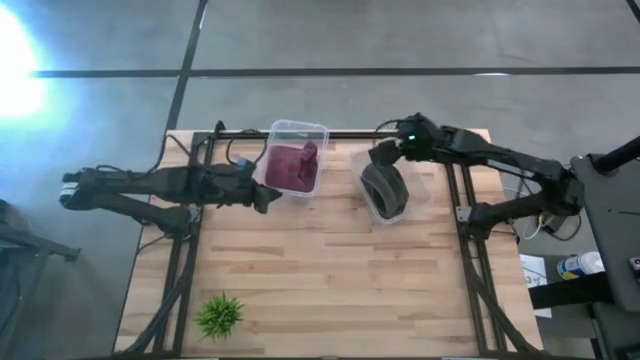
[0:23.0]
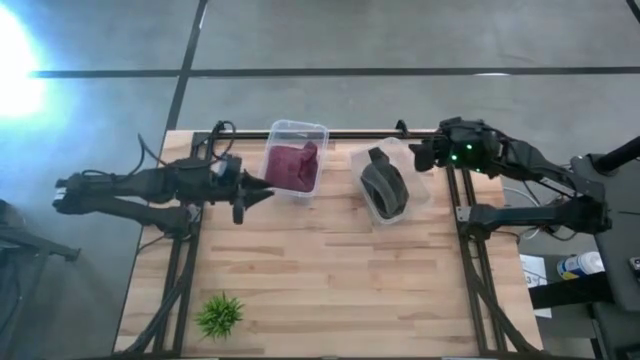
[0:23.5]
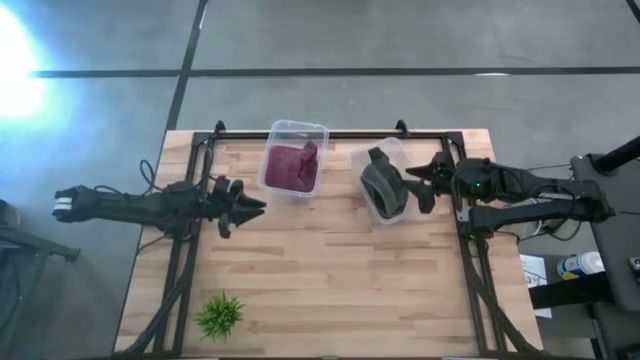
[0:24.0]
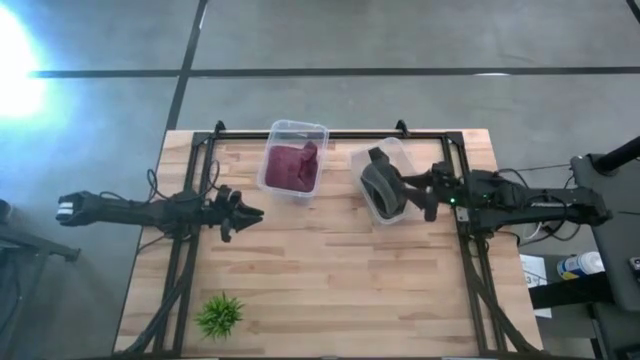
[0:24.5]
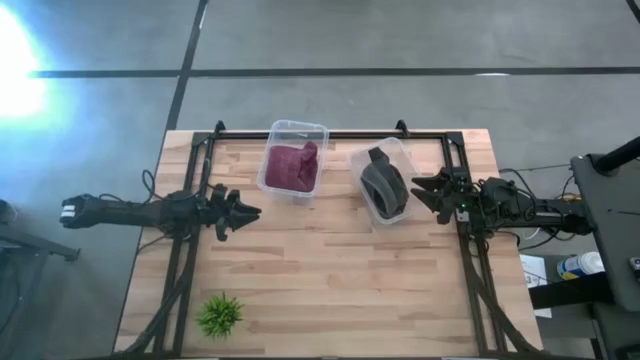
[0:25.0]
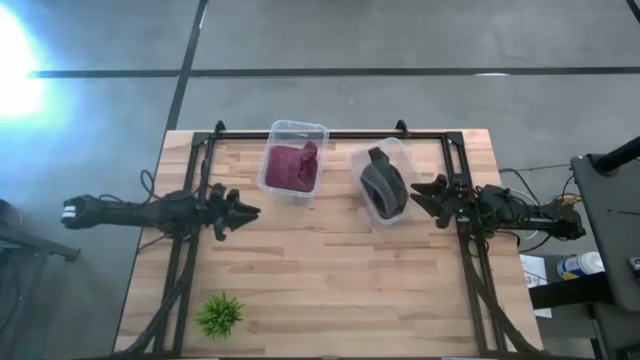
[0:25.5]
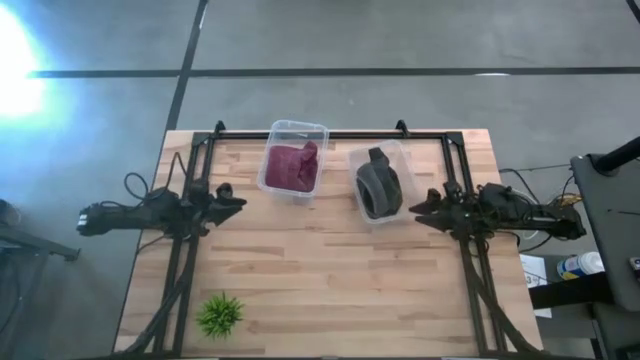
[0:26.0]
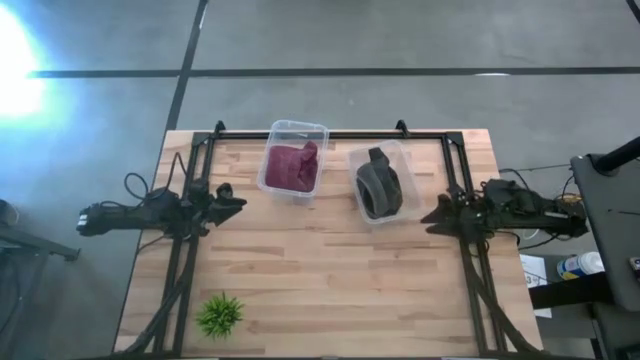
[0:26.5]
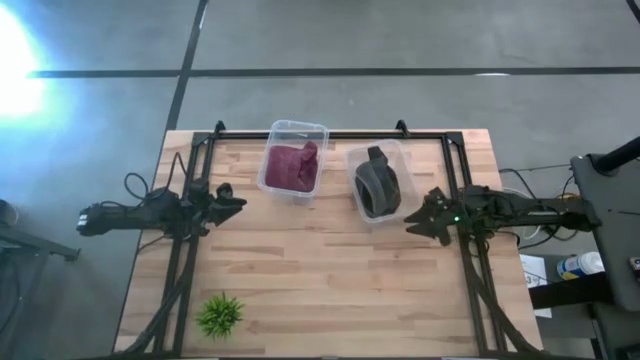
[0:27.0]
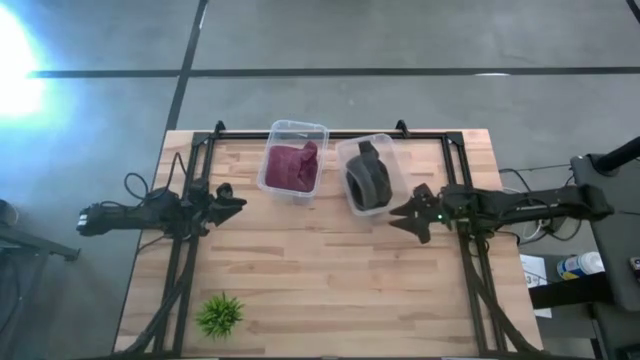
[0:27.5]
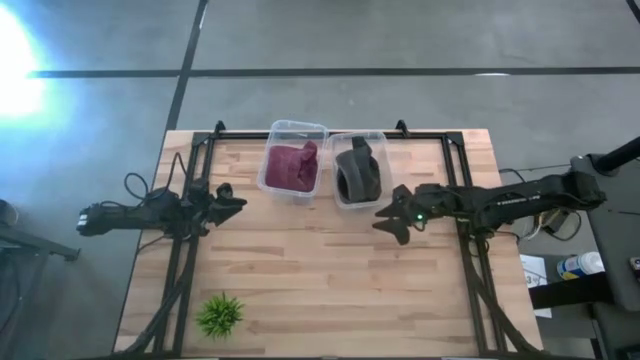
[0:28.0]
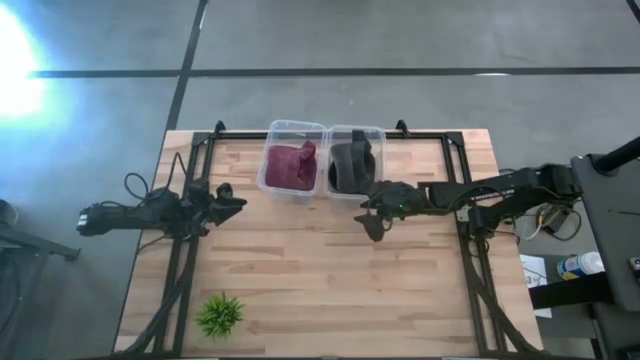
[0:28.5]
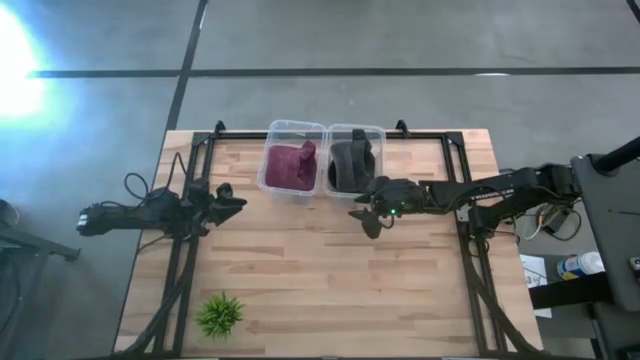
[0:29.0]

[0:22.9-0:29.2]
Task: Pick & Place hat
Adjust the right transparent bin

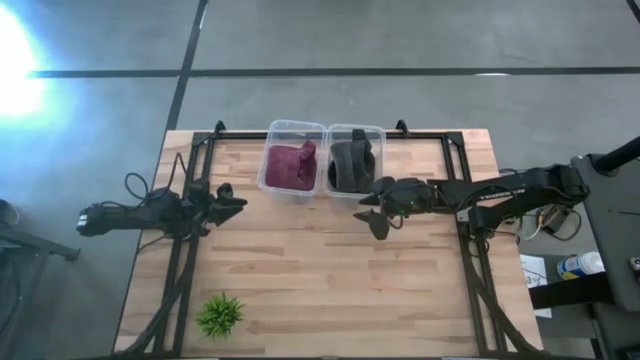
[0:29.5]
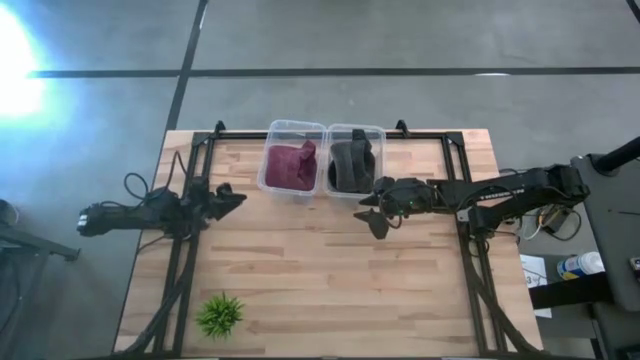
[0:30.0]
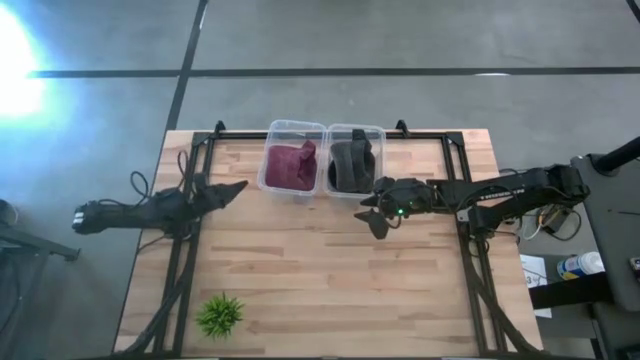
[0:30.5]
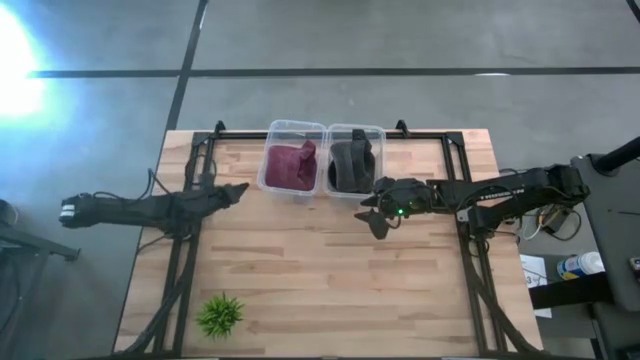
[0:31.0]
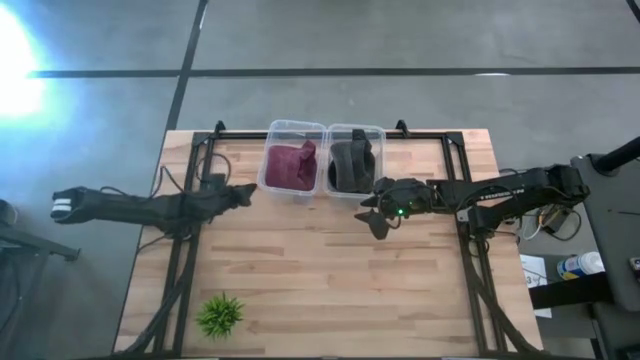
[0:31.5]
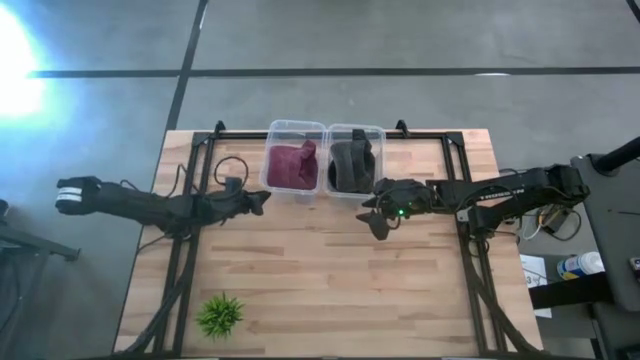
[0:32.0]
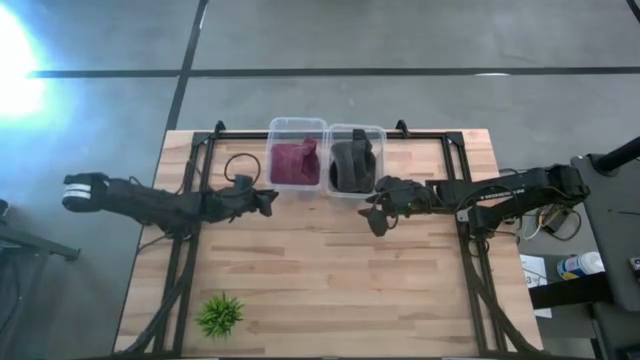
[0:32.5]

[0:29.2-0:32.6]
Adjust the left transparent bin

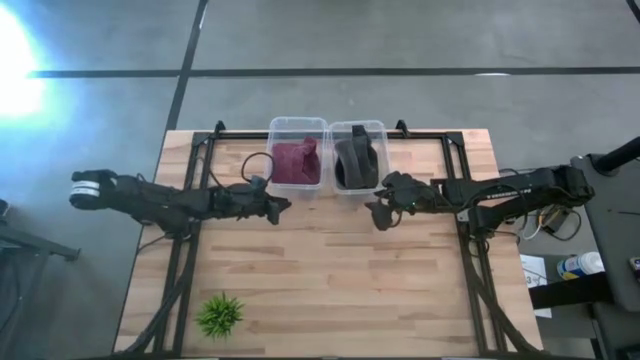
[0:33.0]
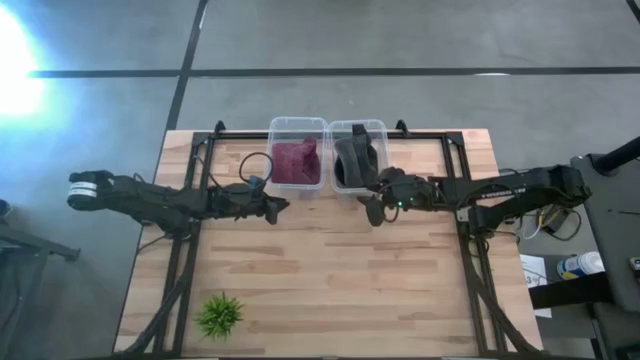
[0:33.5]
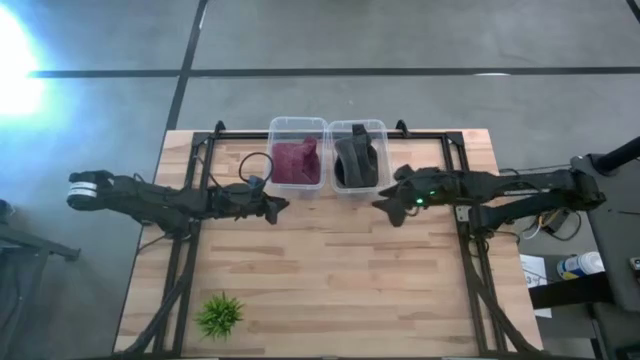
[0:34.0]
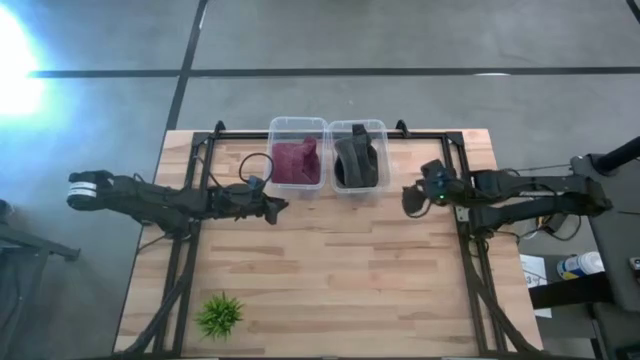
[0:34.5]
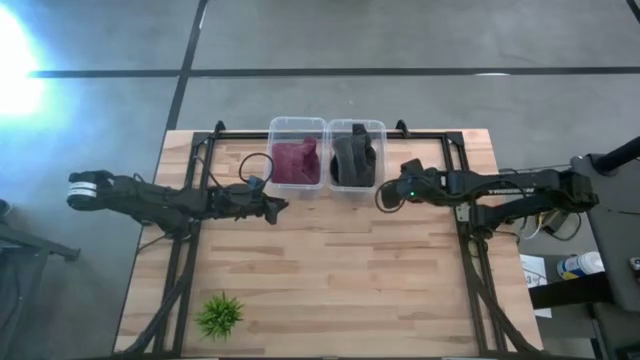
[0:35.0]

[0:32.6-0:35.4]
Adjust the right transparent bin

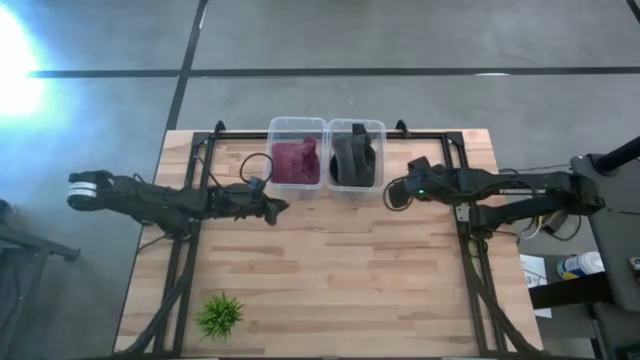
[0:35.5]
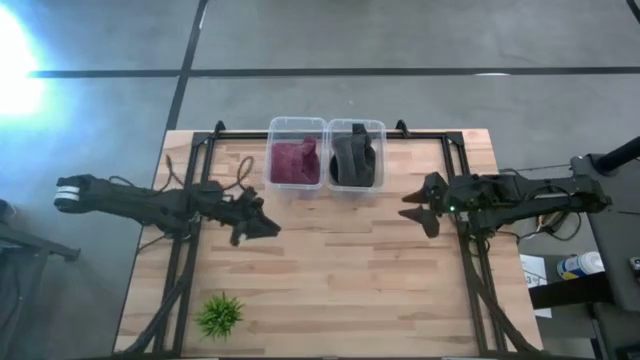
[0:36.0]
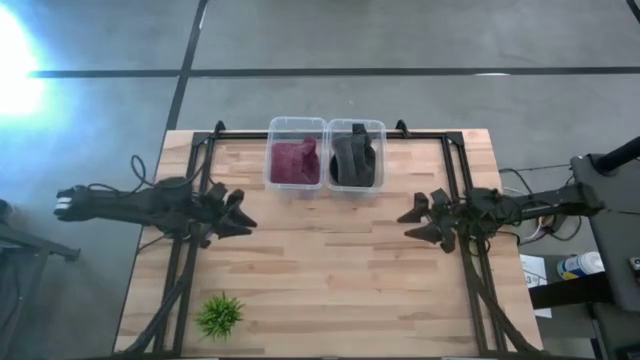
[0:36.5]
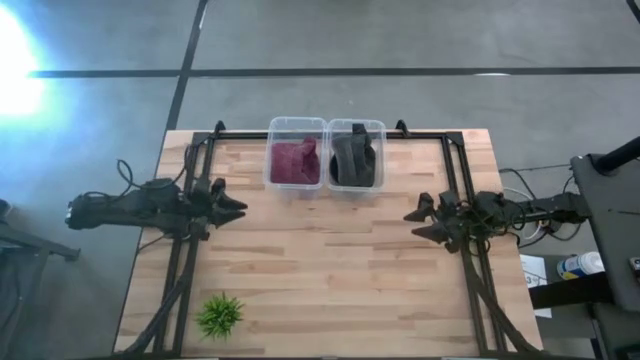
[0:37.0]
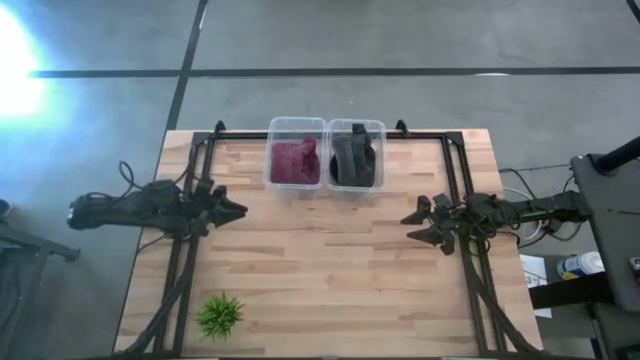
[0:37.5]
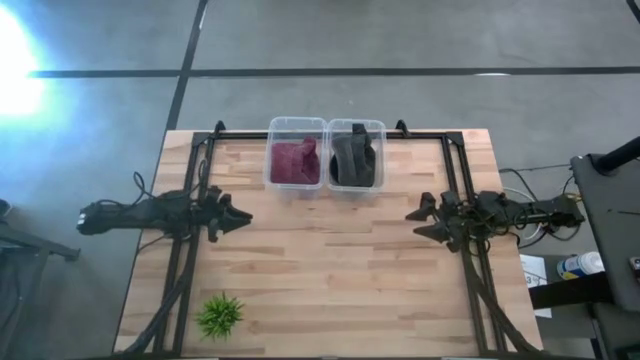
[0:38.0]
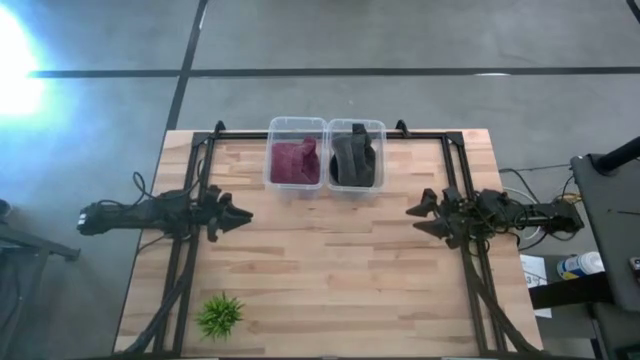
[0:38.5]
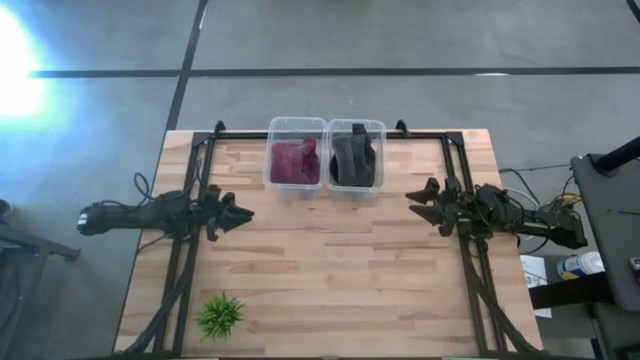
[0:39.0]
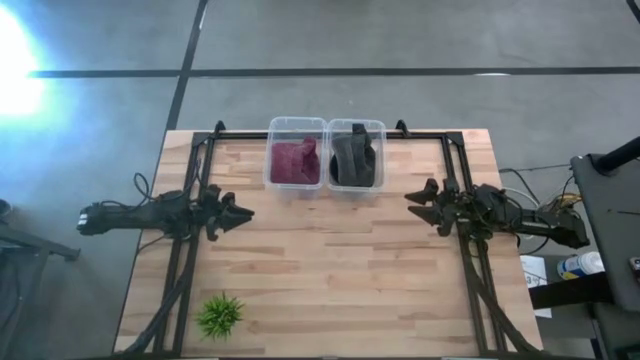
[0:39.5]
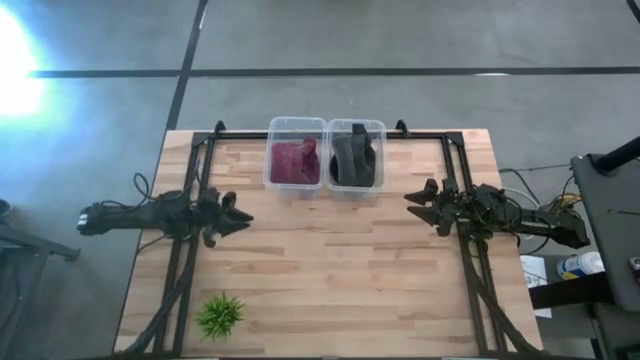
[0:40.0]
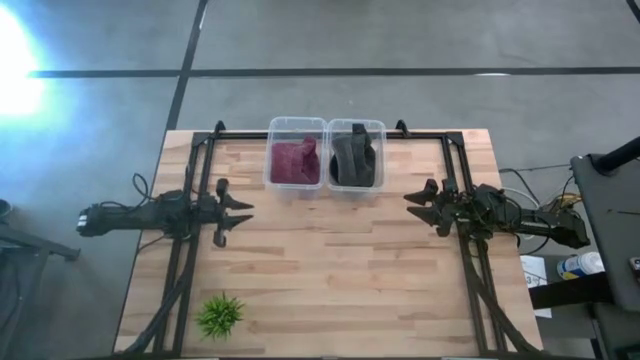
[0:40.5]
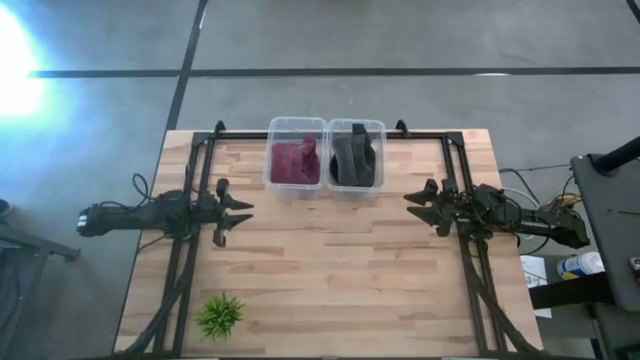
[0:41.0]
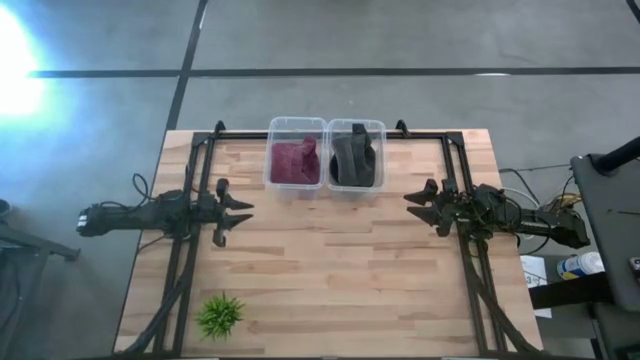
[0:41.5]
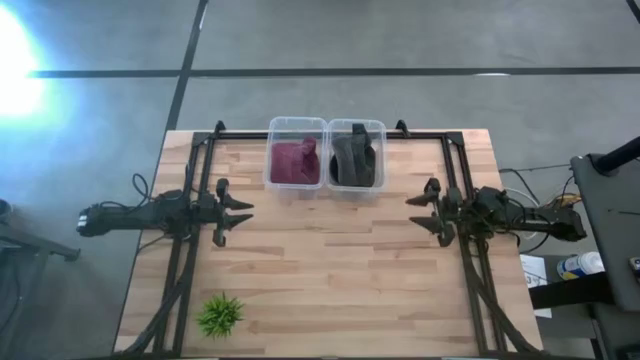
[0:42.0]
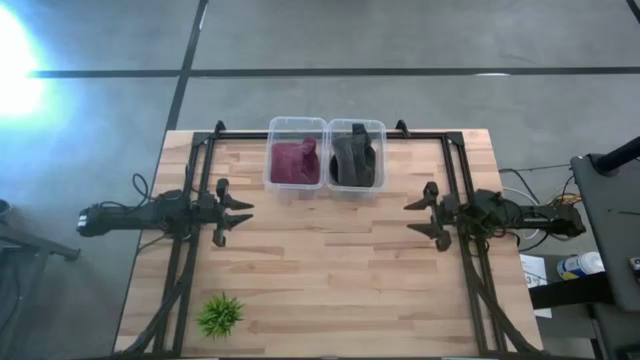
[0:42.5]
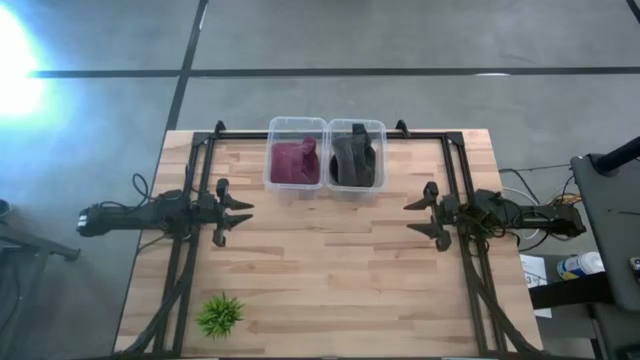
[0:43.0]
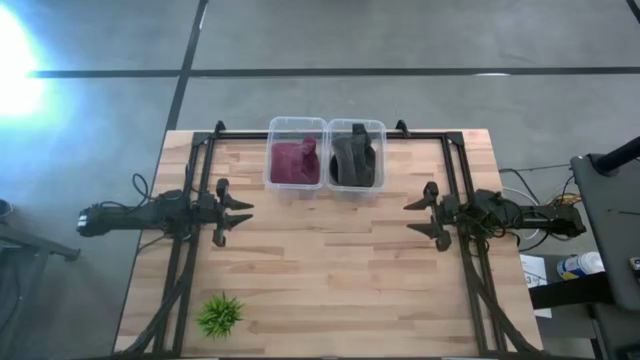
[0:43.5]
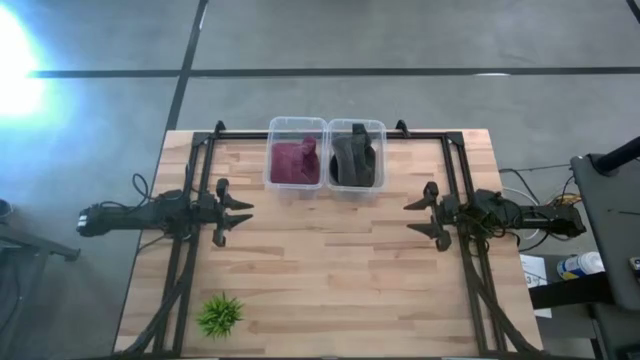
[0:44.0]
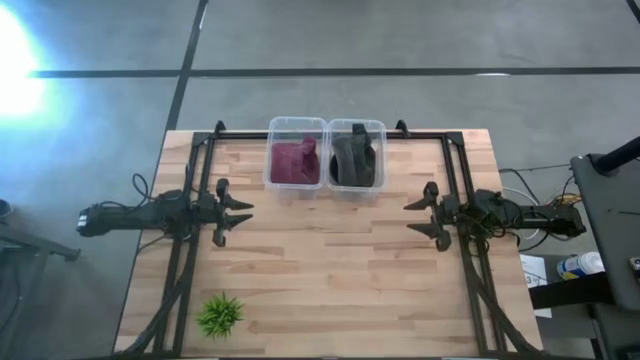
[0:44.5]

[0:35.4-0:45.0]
Return to Home Position
